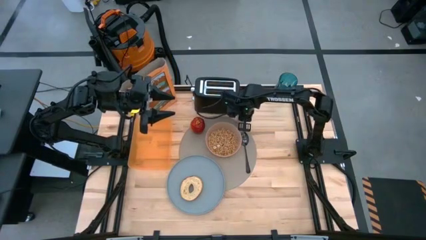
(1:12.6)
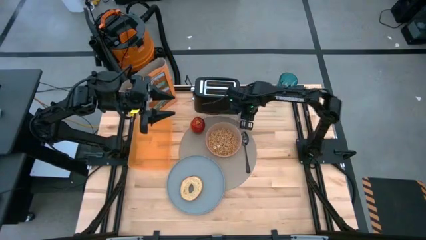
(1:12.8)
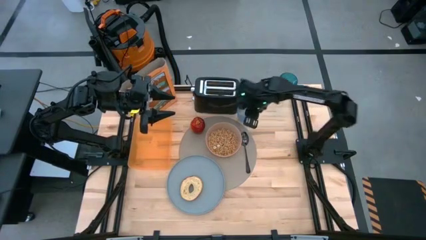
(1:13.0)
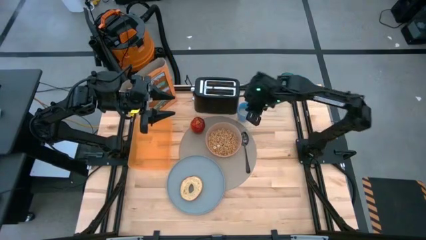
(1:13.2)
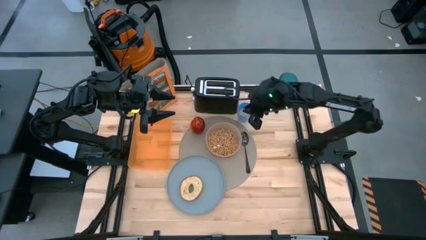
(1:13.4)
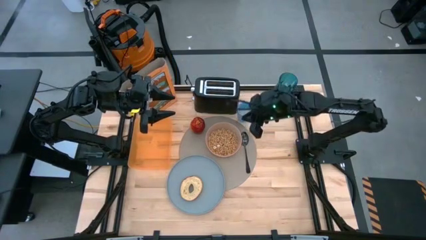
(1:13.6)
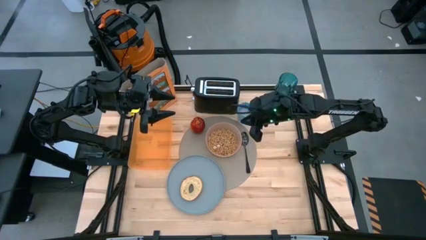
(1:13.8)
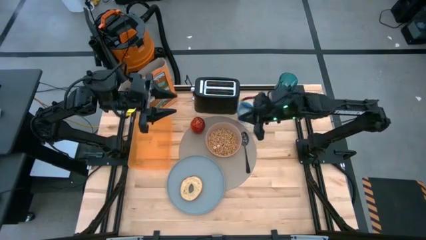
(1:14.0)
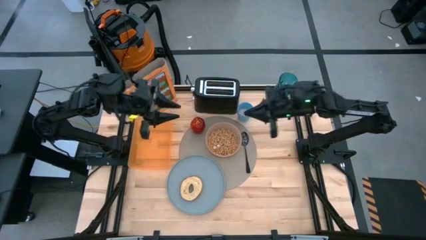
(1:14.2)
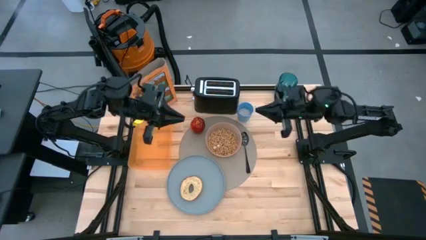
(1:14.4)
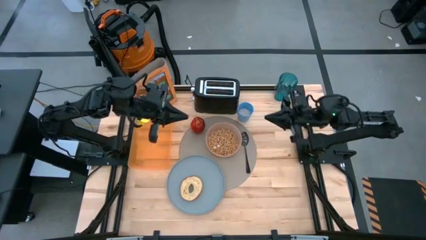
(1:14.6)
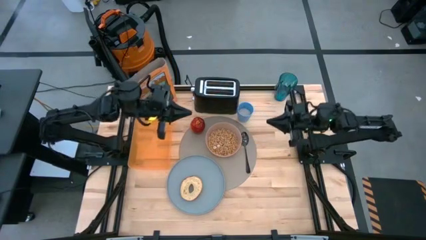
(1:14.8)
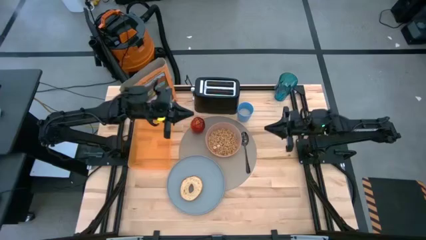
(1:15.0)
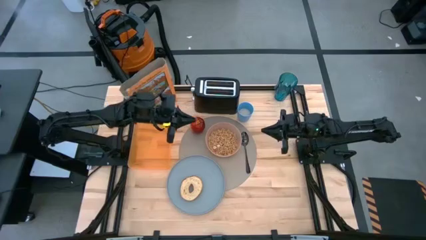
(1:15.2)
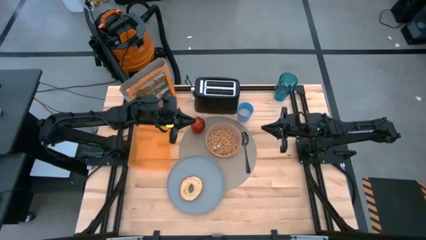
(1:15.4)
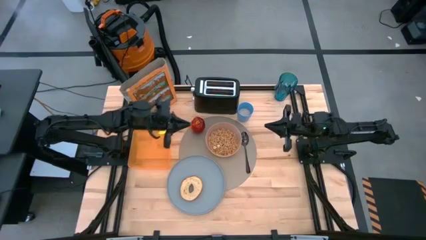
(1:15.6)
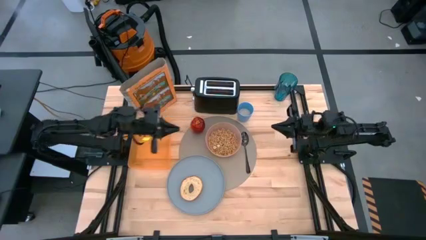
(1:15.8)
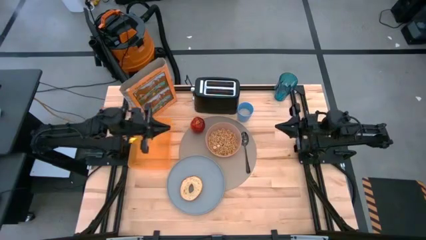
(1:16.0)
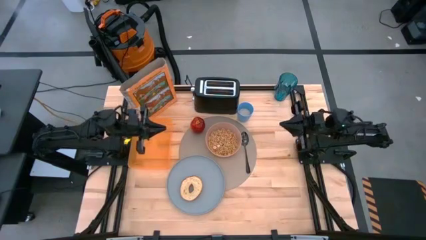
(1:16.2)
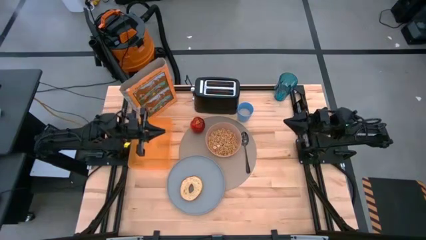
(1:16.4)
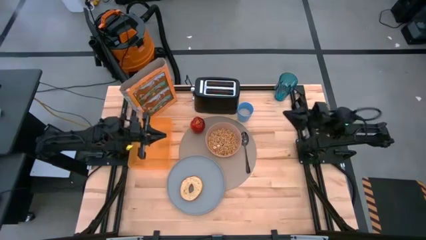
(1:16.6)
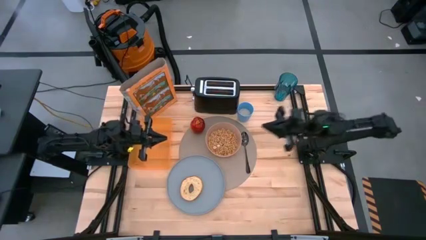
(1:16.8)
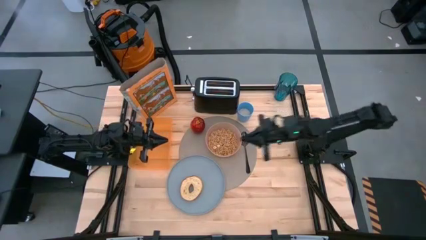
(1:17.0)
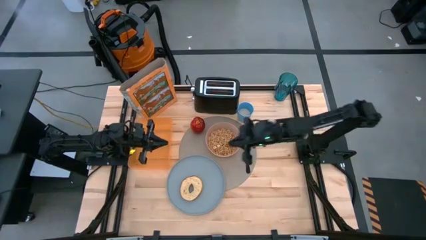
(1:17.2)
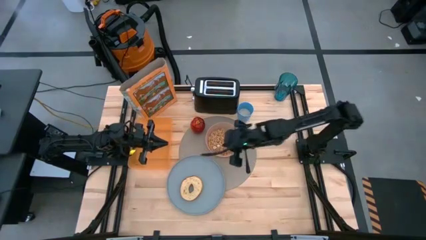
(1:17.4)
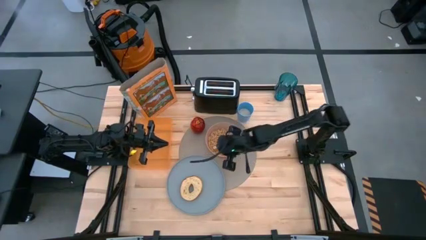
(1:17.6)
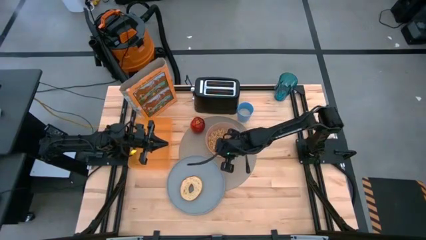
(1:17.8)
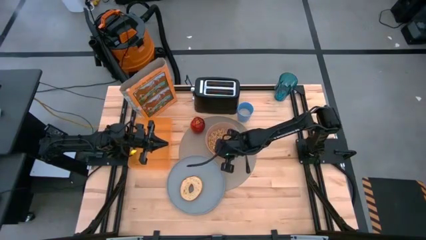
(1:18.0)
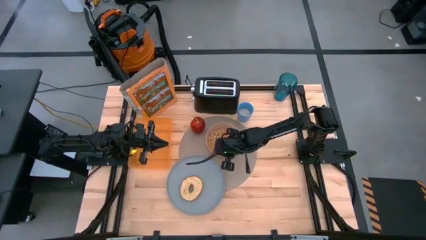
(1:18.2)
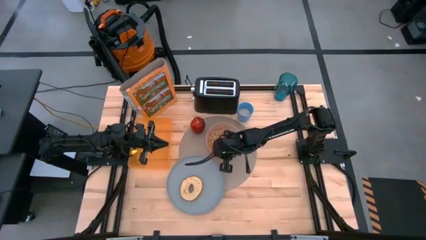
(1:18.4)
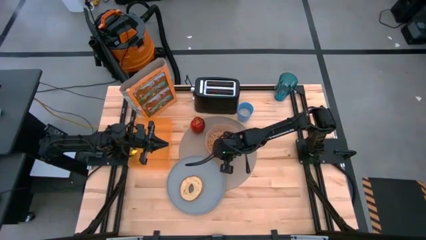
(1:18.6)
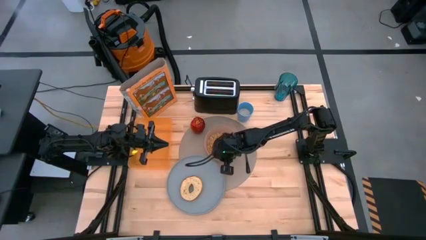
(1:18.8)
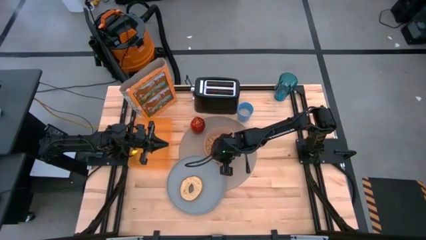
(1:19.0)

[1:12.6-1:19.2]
Task: Arrange a breakfast setting
Adjust the orange bowl on the gray table mat

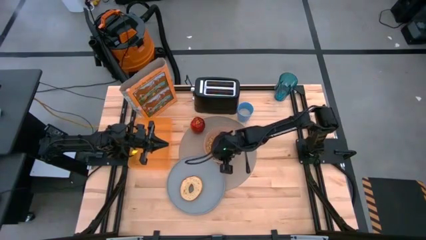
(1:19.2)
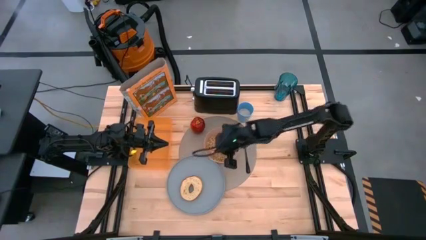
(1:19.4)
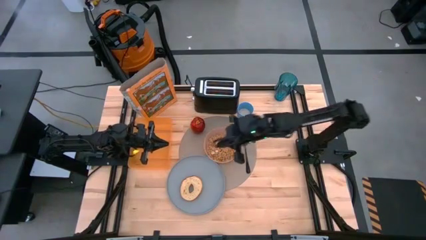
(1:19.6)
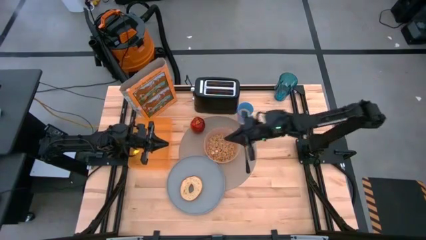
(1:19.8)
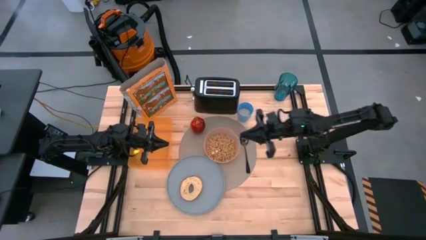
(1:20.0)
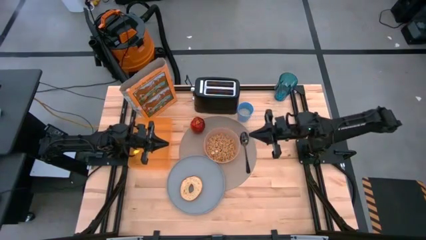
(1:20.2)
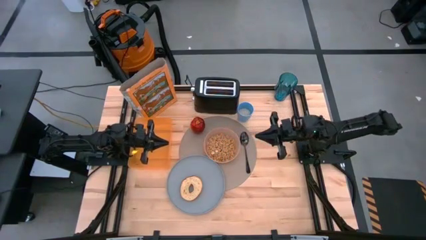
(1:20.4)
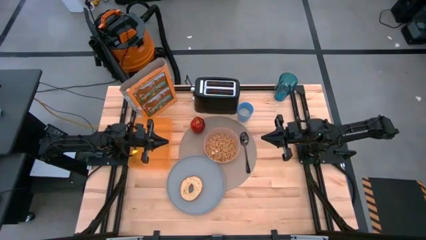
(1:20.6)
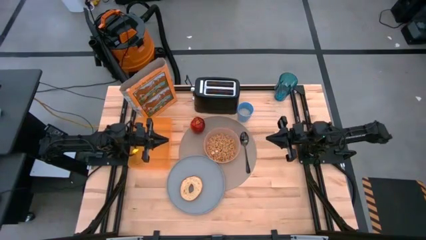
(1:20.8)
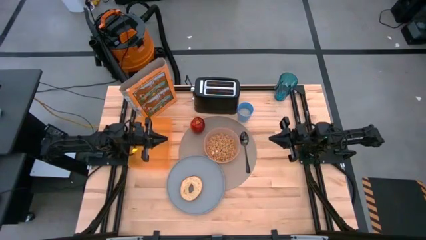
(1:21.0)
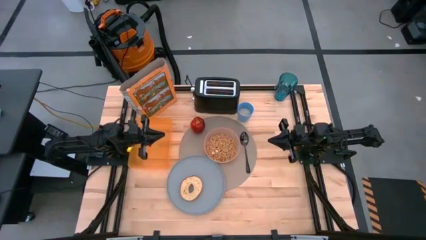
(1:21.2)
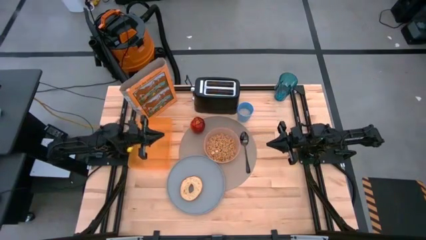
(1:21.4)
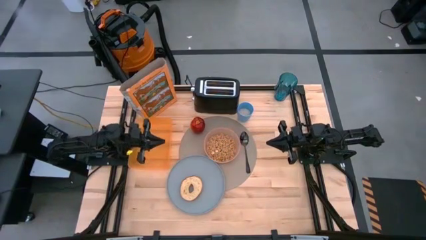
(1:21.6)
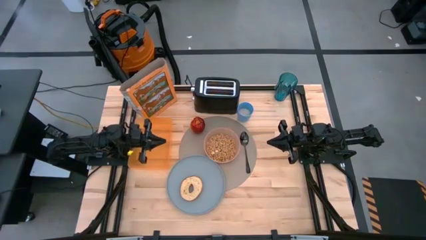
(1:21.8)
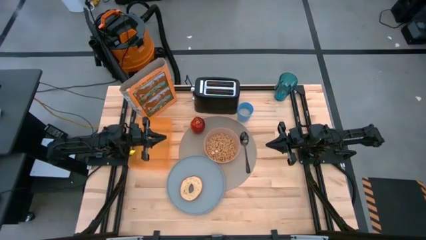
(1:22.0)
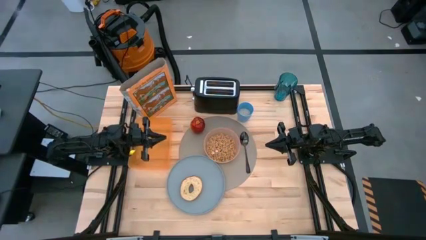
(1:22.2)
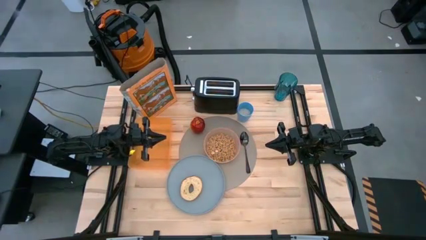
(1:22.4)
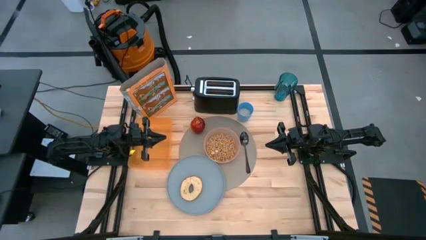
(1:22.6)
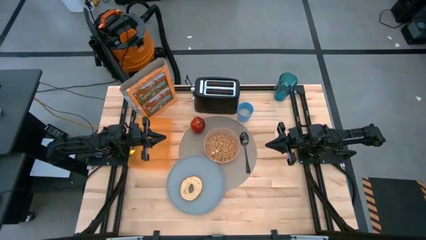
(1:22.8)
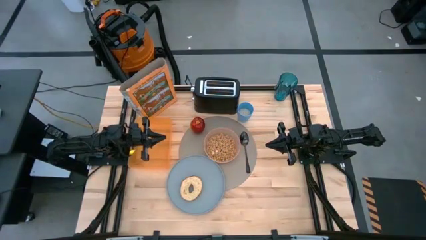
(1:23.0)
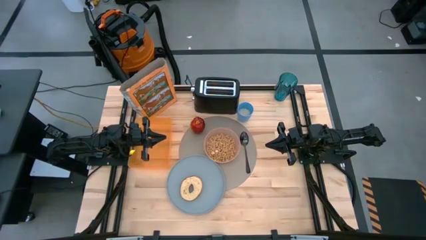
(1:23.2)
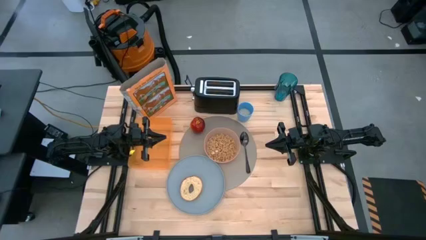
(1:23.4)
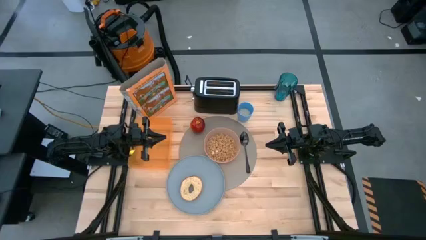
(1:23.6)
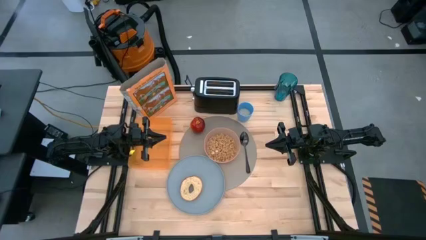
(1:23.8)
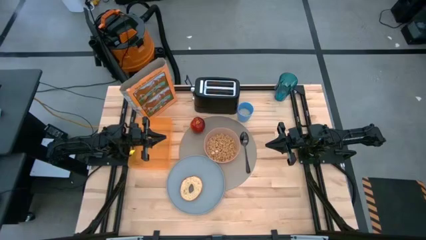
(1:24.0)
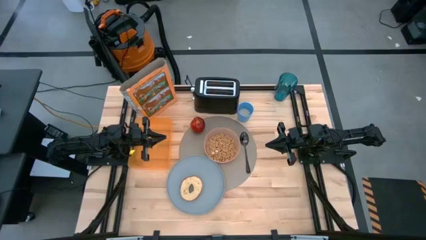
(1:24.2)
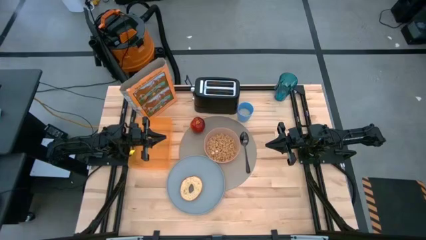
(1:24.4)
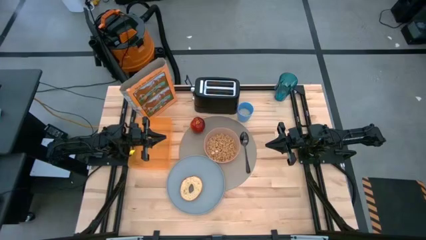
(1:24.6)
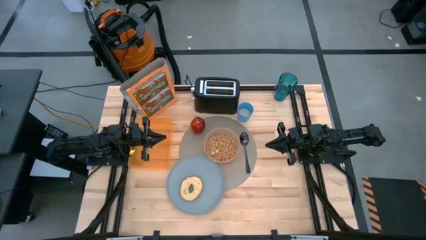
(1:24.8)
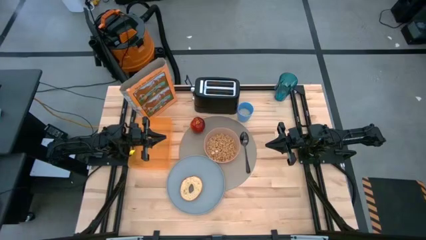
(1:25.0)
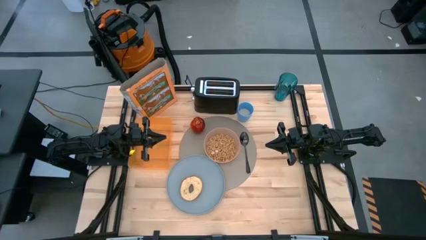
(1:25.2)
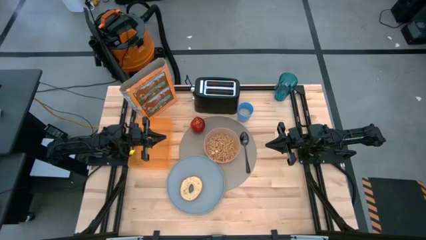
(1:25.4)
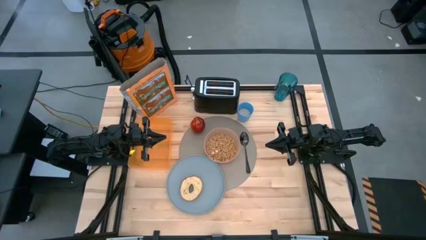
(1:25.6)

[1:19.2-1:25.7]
Return to Home Position

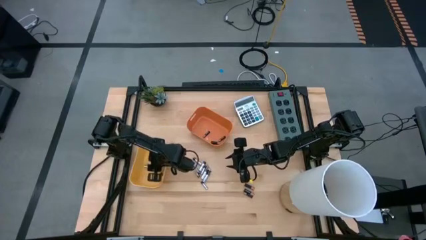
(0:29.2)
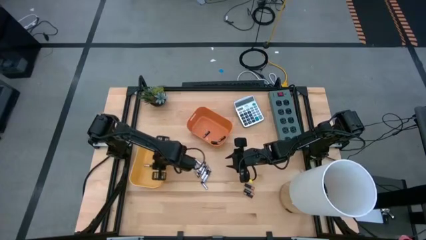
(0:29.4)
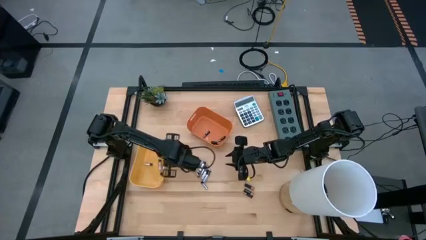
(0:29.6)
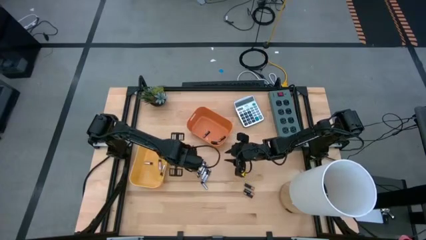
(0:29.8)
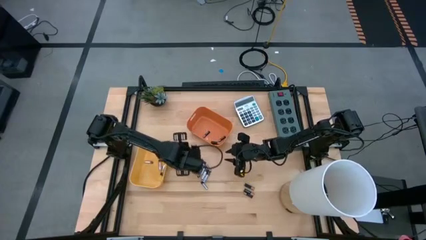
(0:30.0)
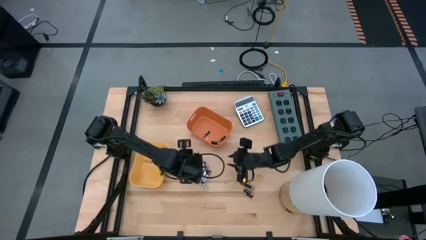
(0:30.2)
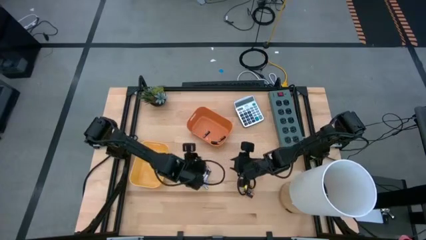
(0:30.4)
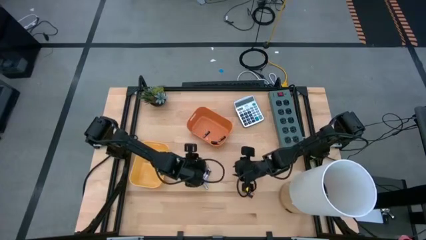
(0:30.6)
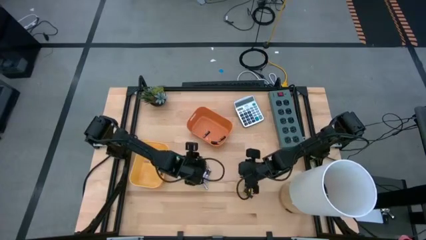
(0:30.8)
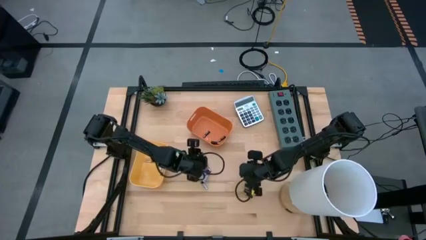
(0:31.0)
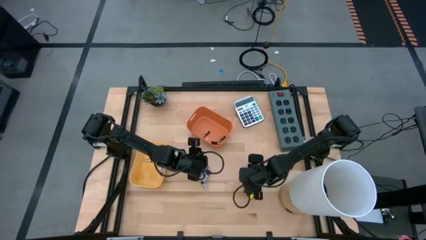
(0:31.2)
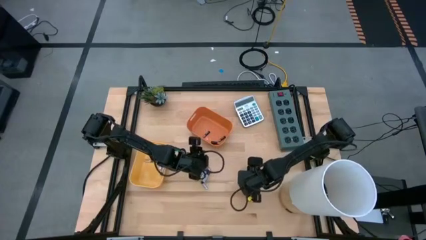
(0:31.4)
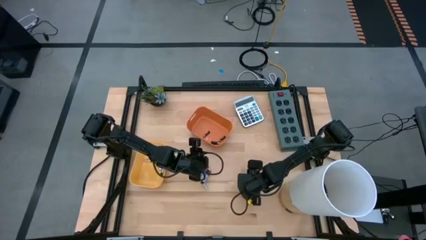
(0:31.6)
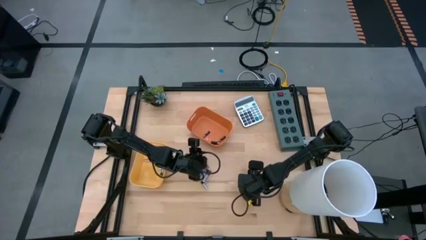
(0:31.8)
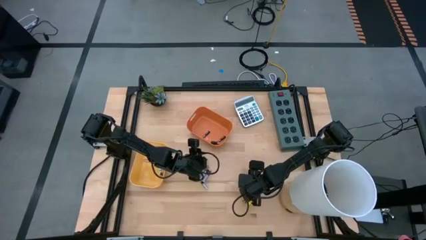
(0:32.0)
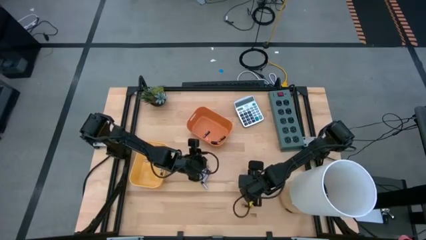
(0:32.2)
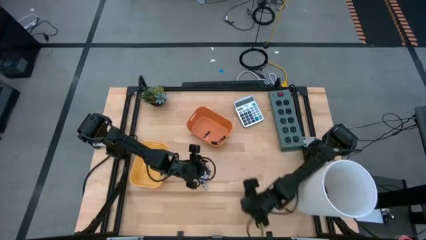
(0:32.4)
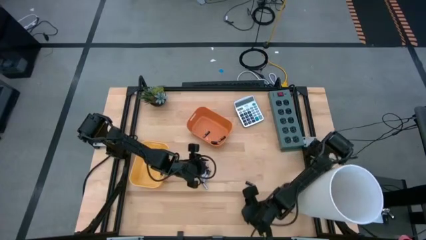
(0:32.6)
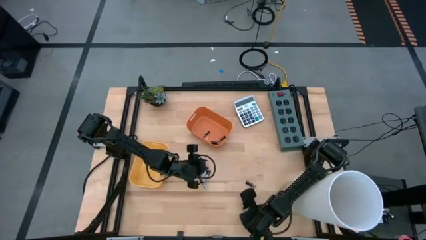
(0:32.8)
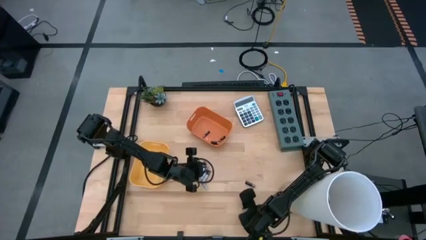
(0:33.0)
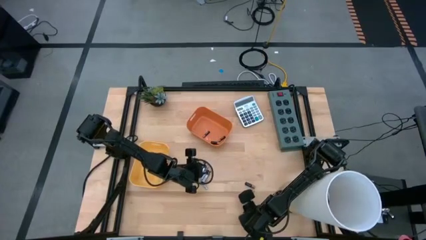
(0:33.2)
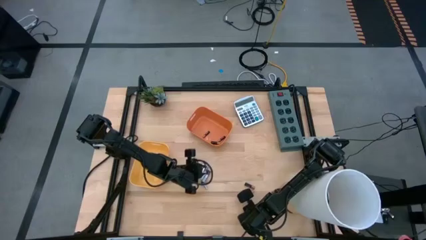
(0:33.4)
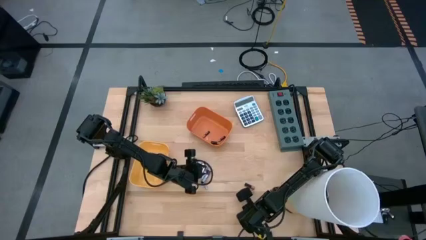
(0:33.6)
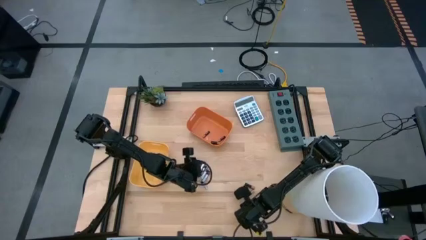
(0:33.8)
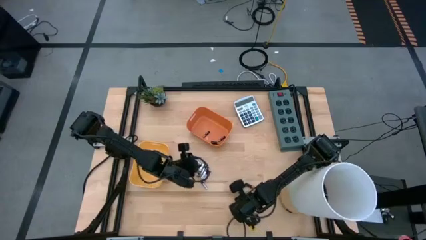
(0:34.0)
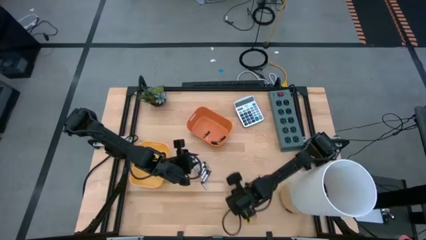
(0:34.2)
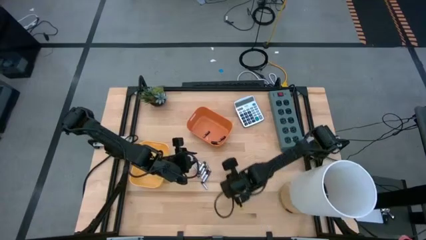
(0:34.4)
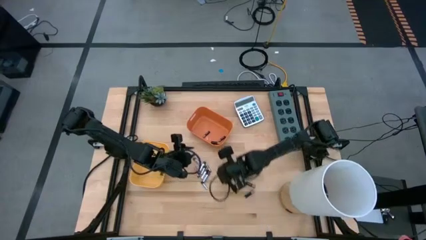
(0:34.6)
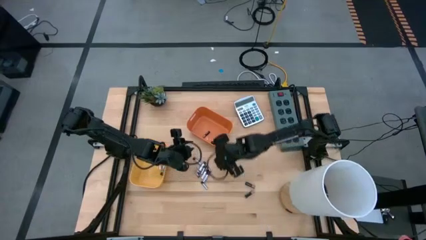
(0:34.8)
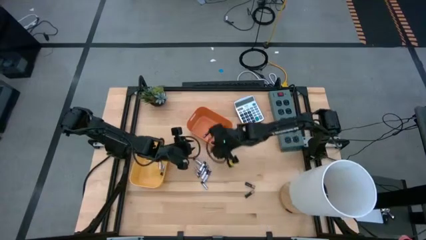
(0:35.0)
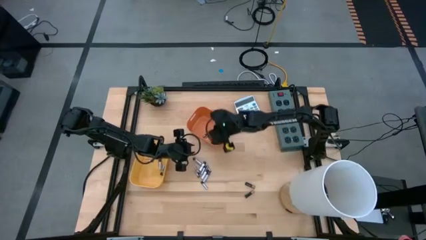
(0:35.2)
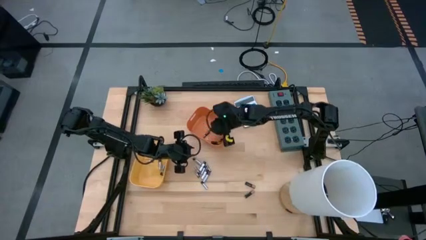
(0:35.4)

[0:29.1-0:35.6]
Task: Sort batteries
Put the black battery into the orange bin
